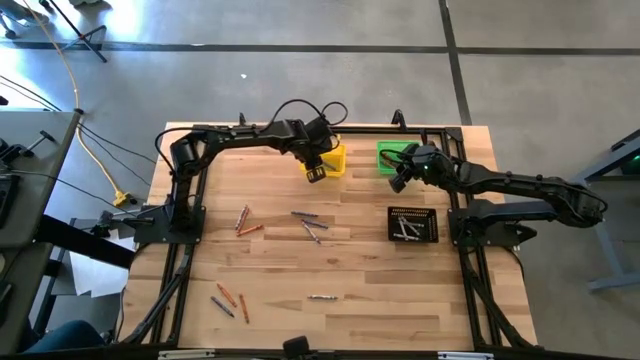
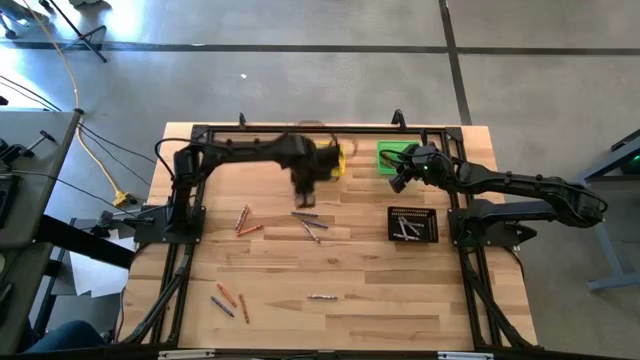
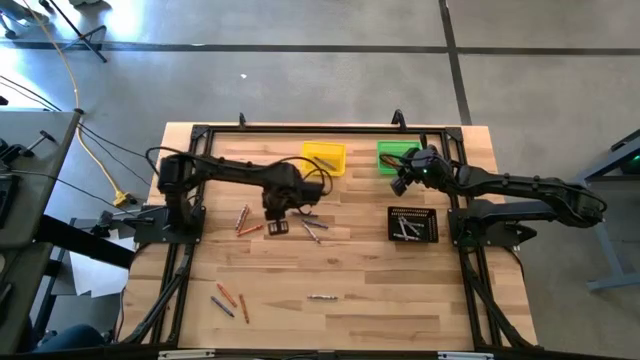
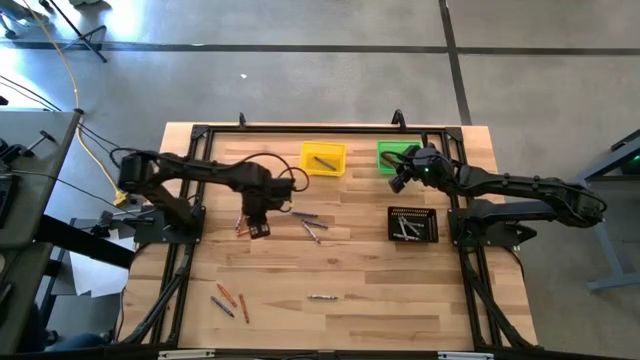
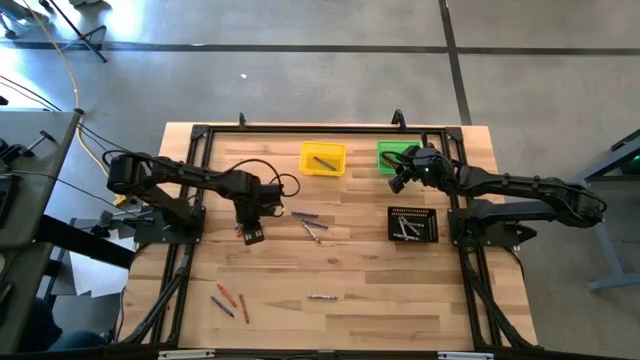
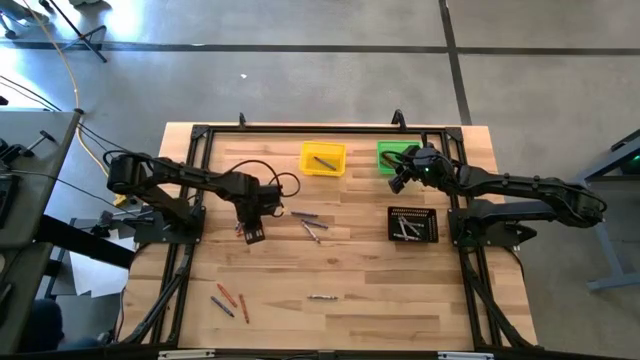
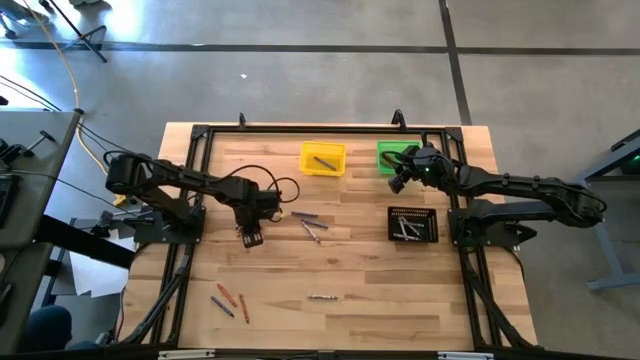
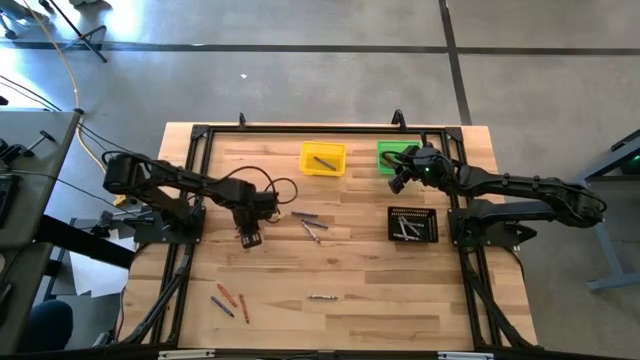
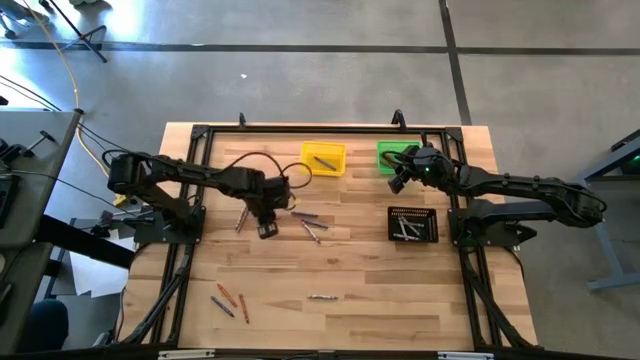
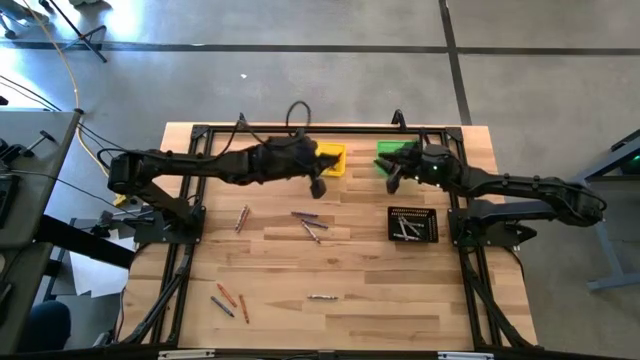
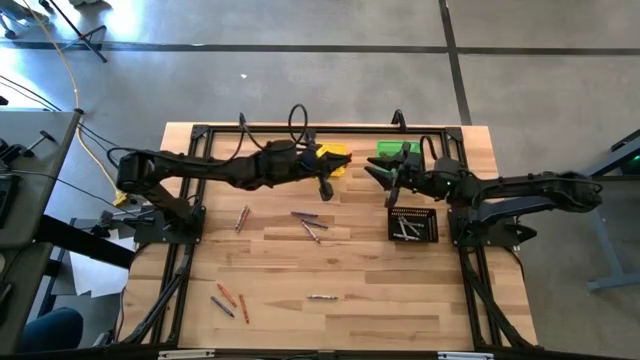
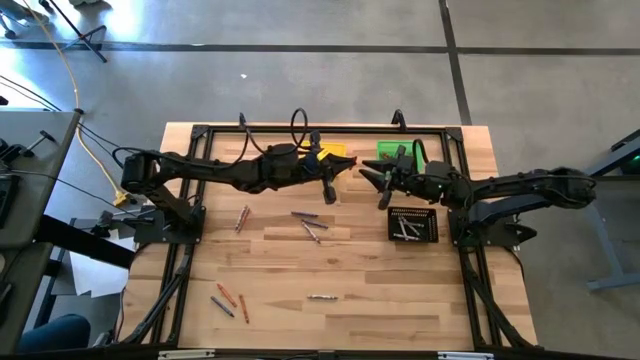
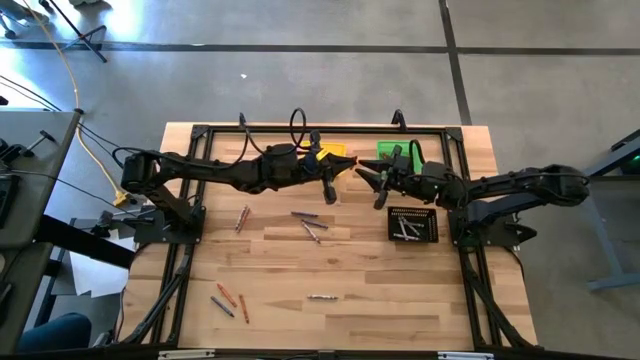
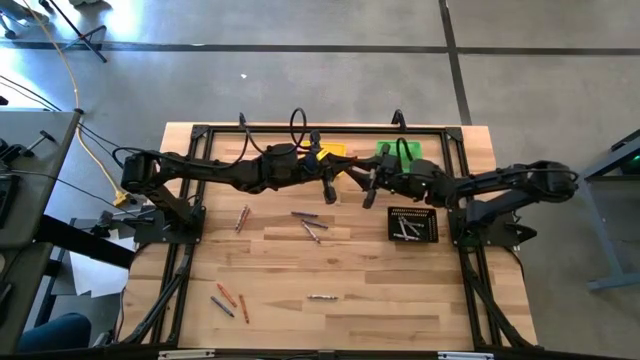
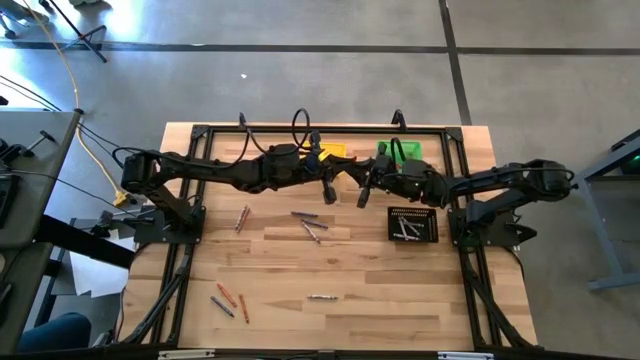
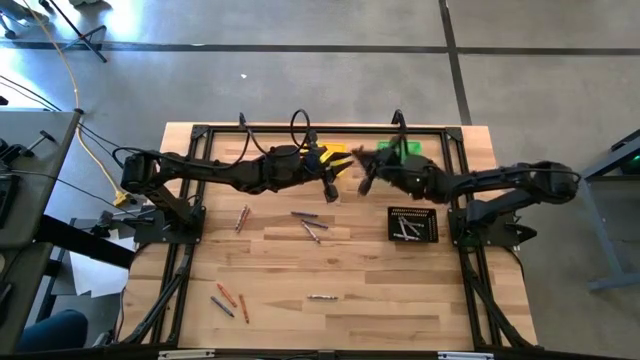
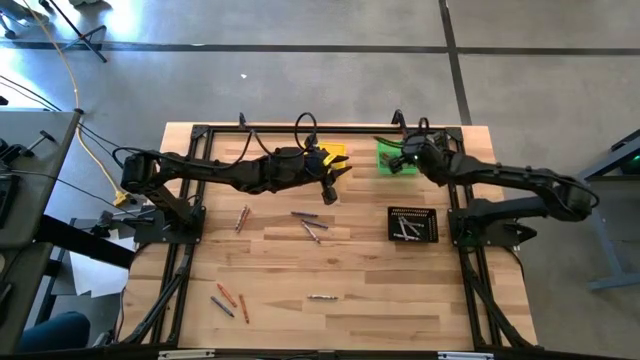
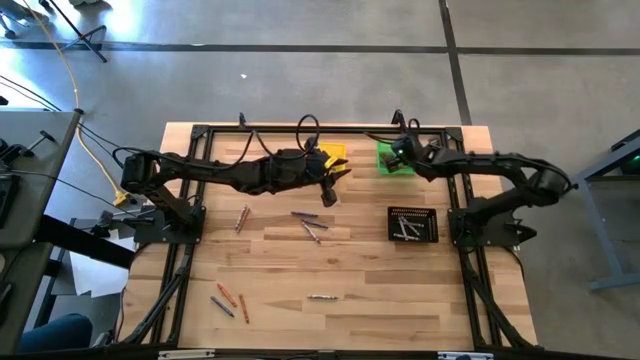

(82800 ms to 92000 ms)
Task: Sort crayons
Put the orange crayon into the green bin

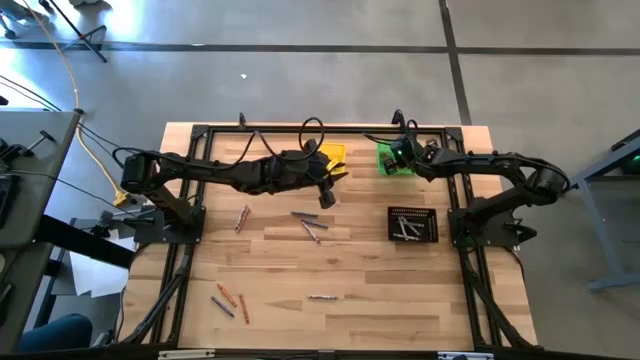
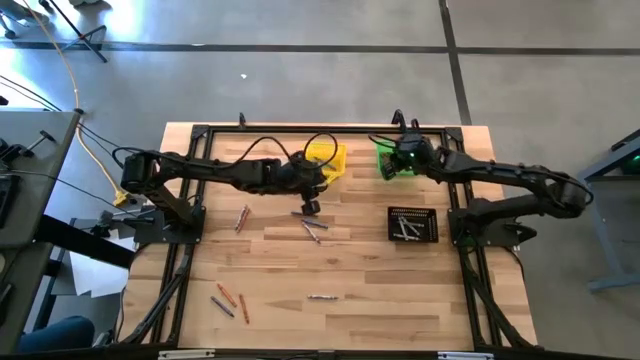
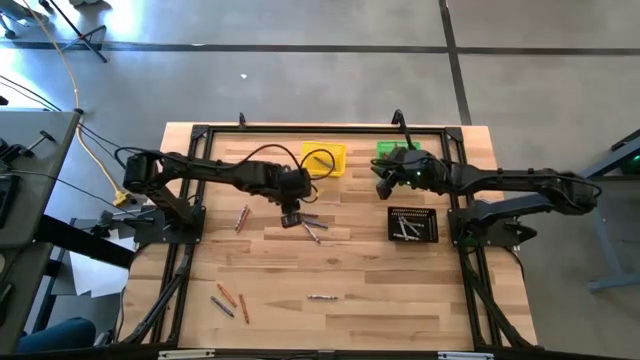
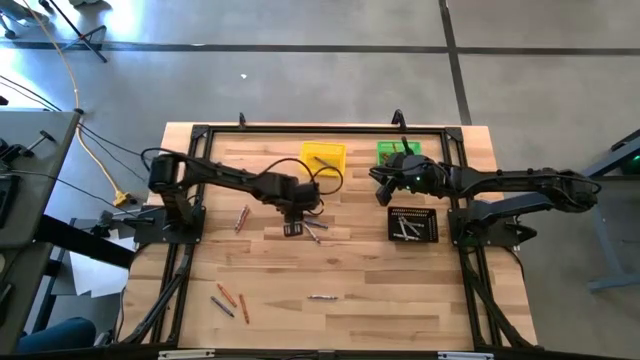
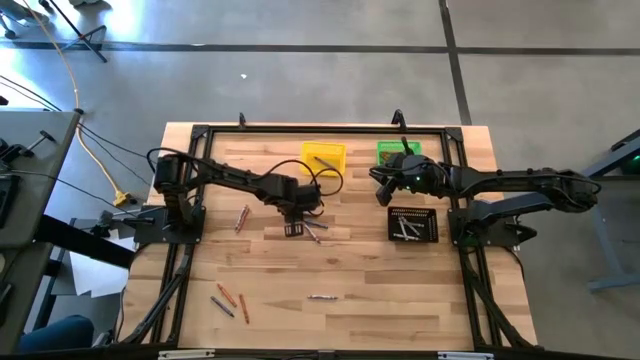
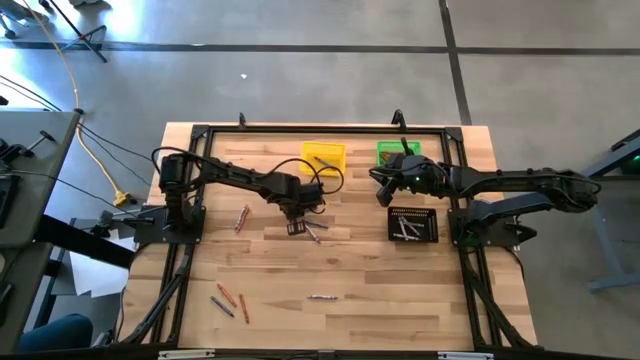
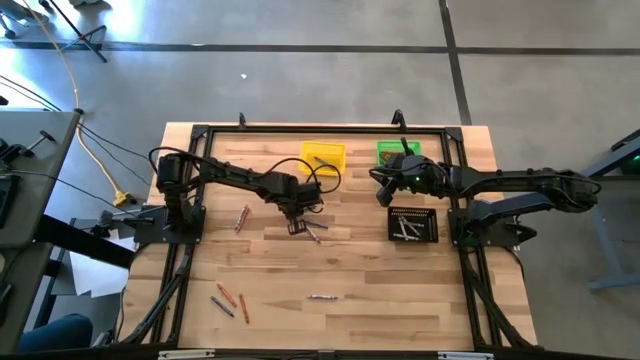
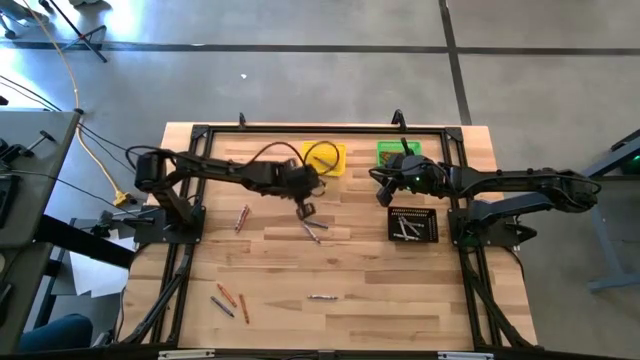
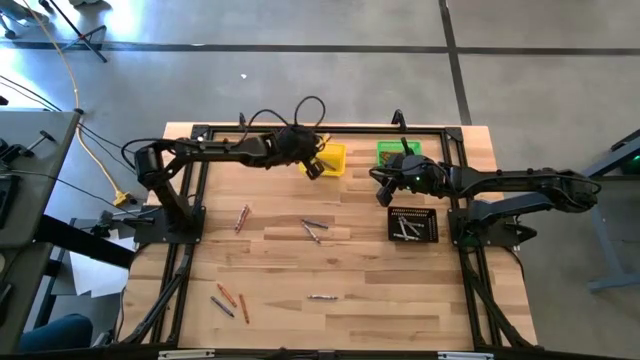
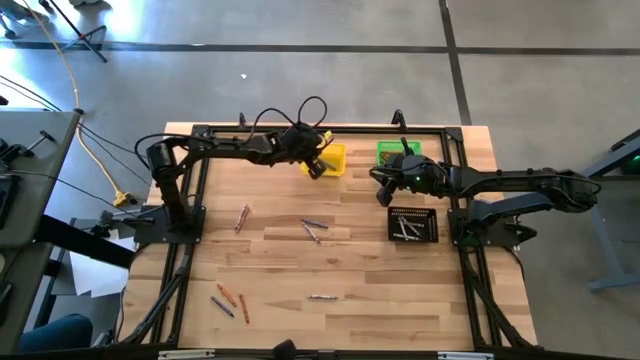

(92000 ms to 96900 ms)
Put the blue crayon into the yellow bin

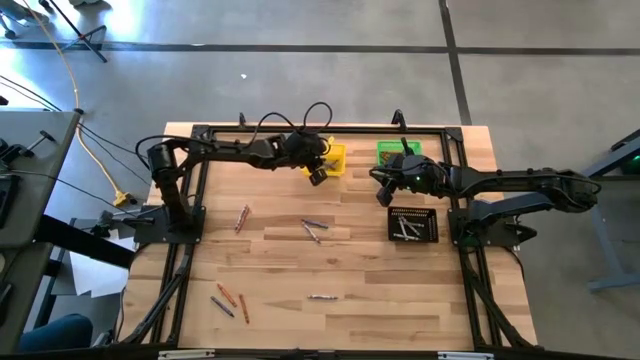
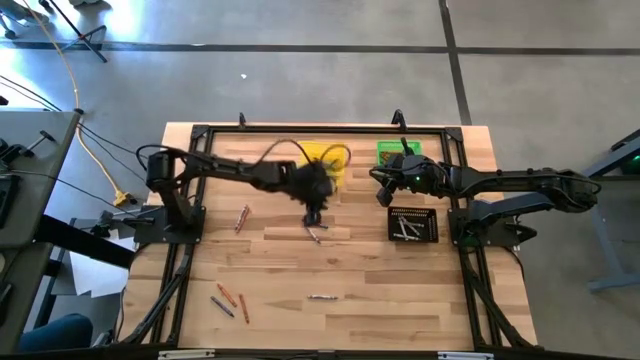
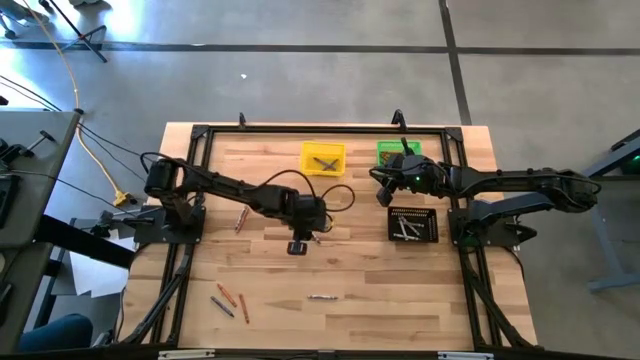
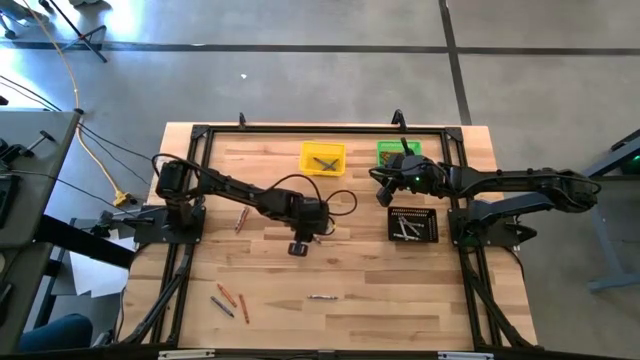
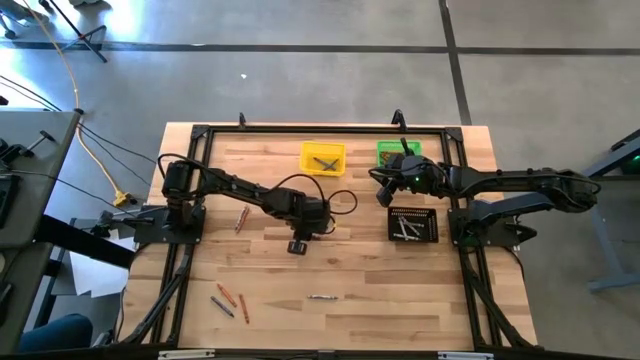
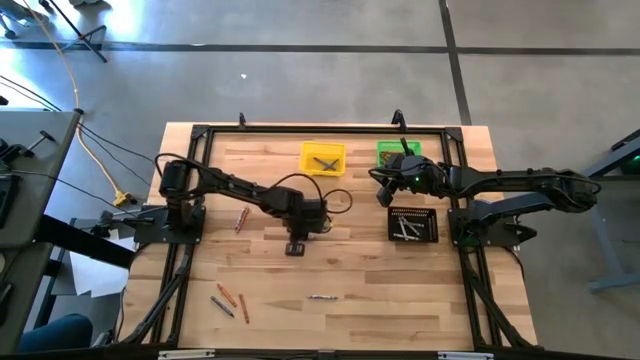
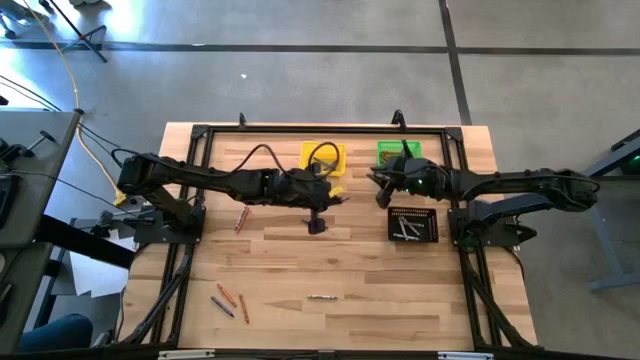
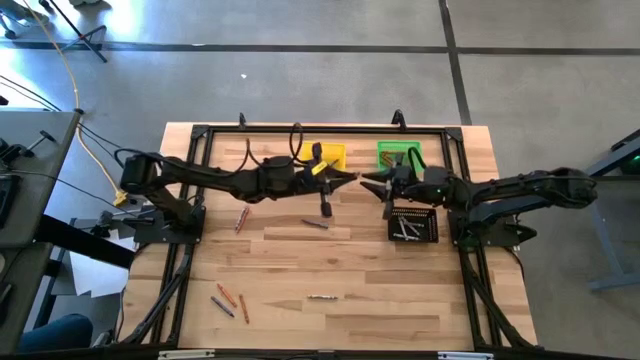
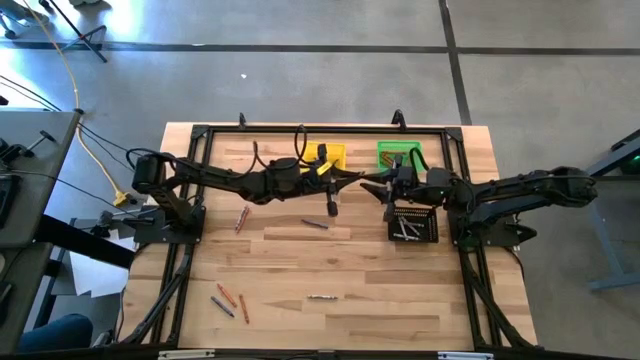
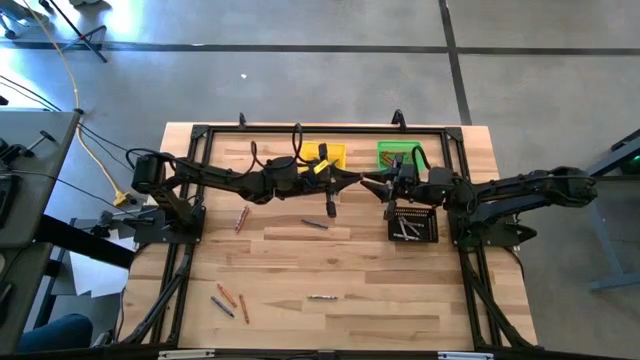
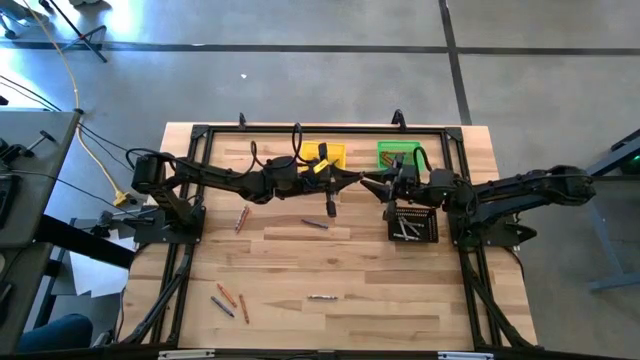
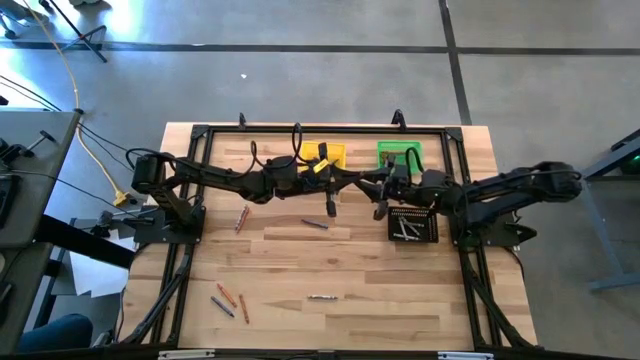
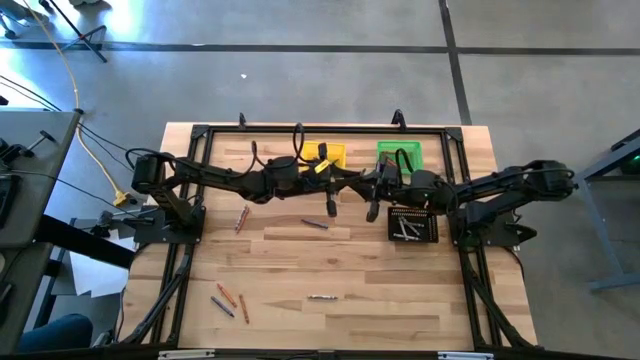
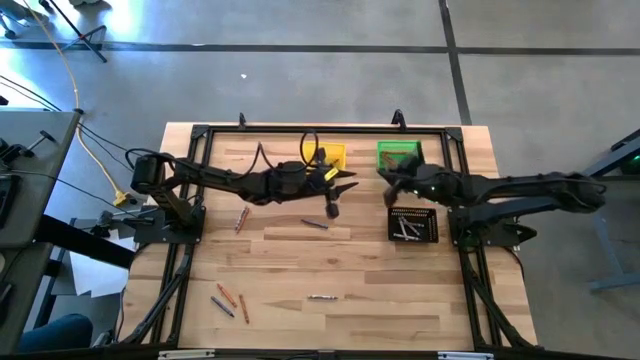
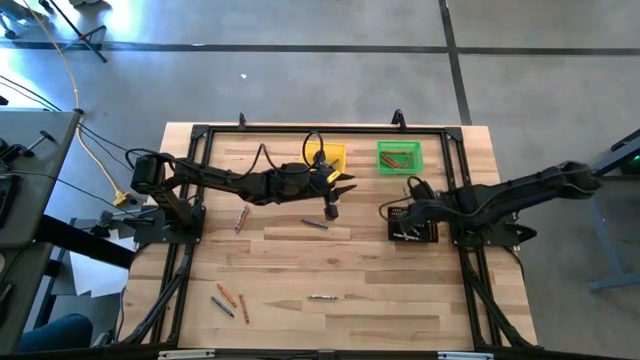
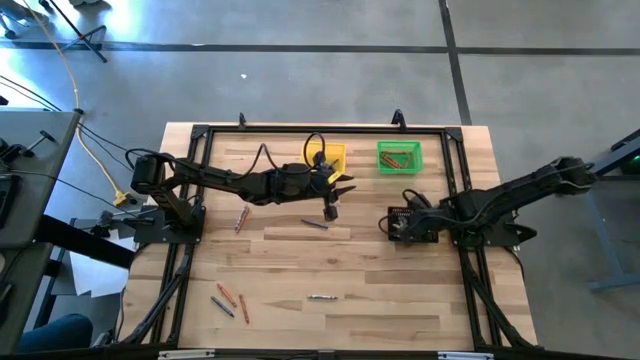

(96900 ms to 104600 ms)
Put the gray crayon into the black bin
